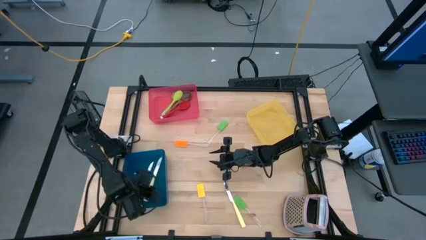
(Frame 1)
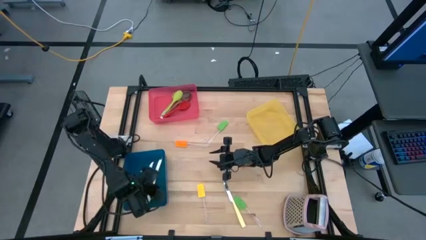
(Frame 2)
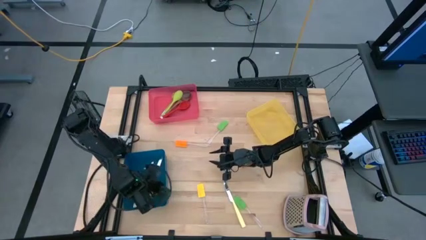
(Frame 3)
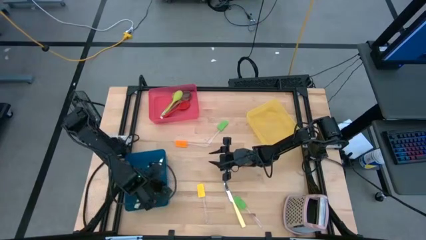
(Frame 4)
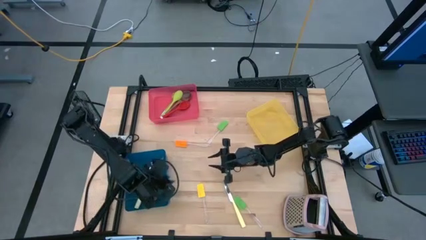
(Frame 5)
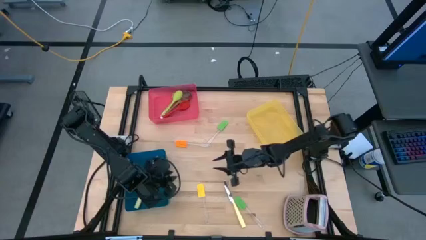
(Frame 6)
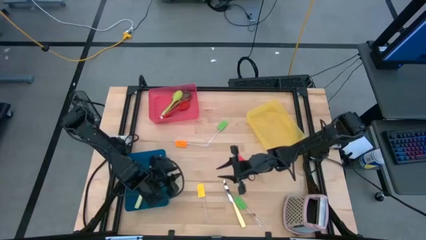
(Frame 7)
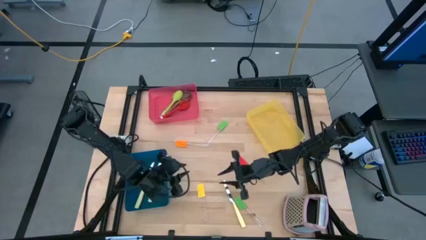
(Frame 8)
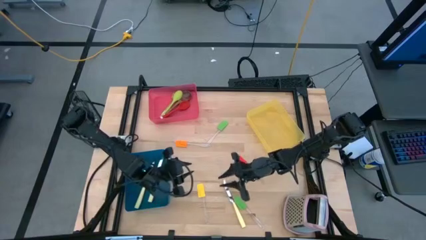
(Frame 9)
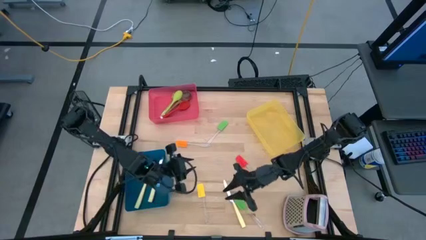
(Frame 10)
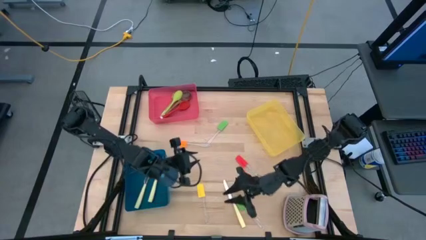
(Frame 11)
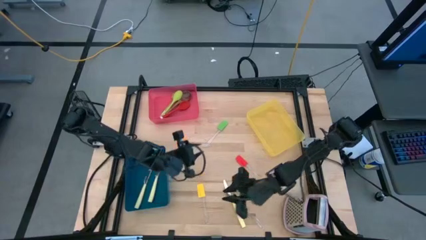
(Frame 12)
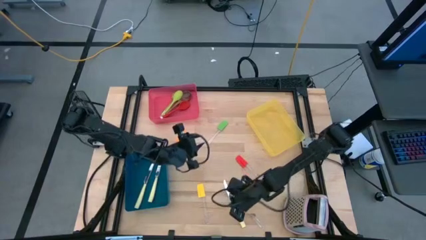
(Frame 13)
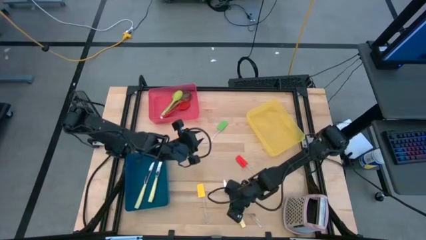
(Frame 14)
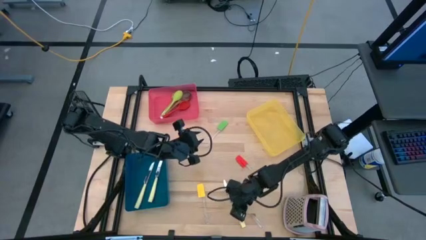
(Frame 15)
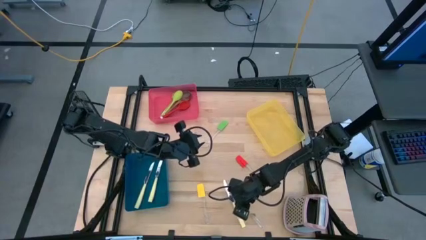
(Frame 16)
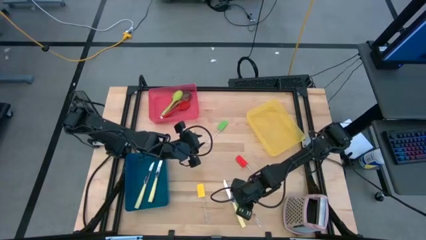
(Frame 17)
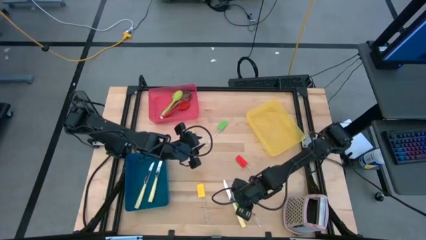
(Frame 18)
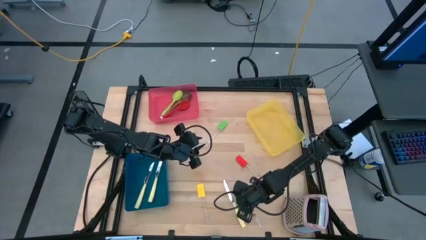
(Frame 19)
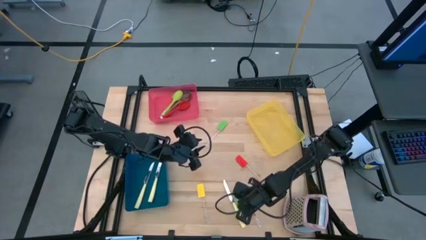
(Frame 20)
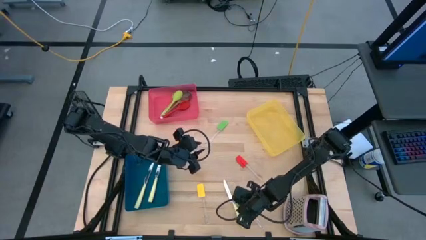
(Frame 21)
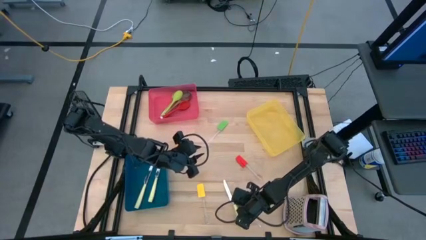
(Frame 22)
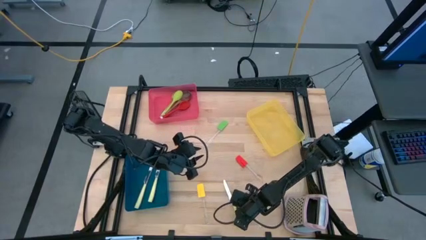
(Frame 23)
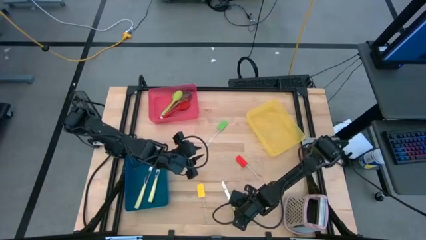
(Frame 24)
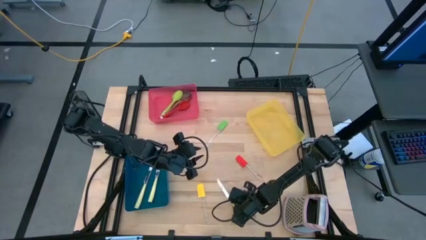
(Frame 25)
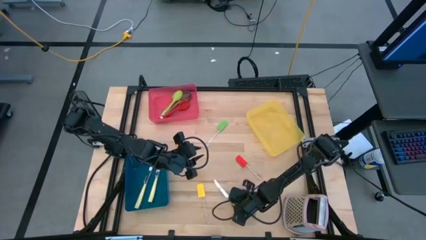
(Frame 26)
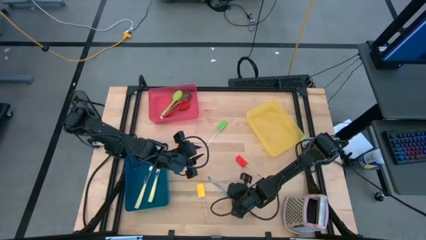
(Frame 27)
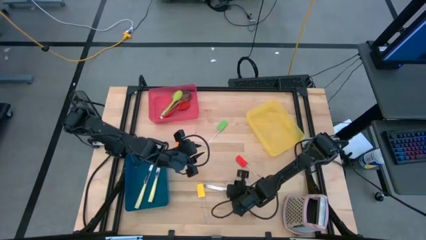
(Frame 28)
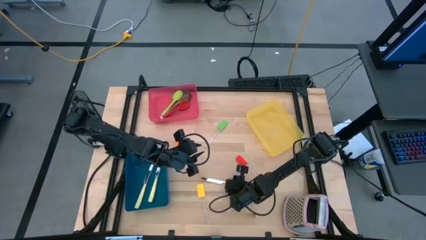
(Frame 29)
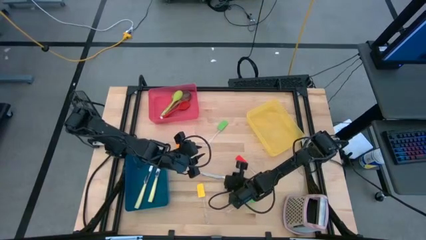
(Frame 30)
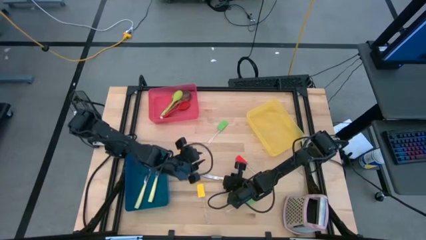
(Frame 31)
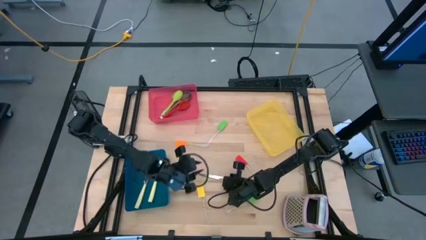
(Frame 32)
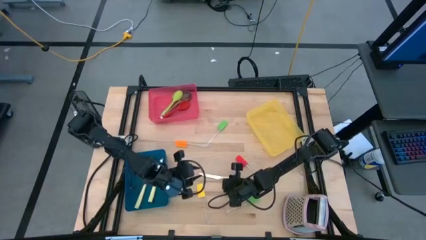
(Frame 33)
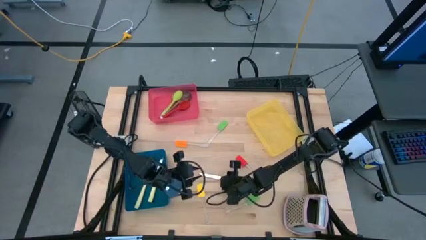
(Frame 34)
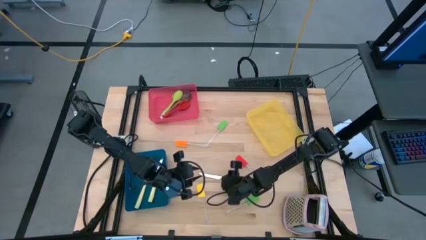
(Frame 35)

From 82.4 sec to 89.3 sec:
Task: Pick & Place Kitchen Items
Put the kitchen knife into the blue bin
